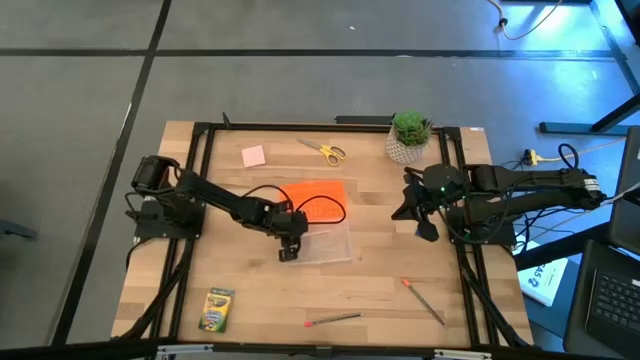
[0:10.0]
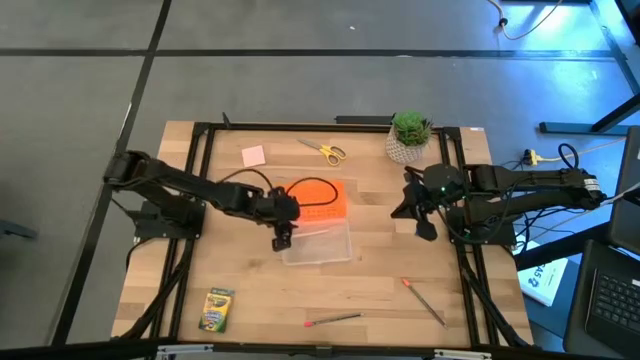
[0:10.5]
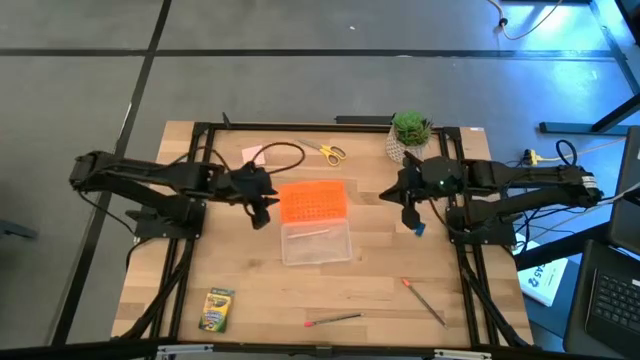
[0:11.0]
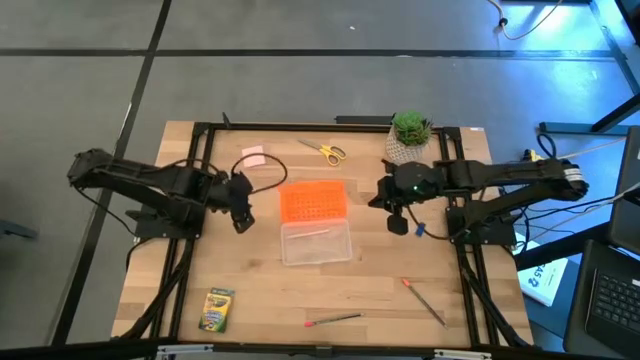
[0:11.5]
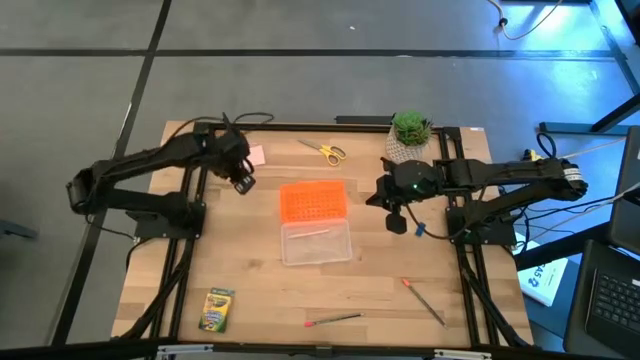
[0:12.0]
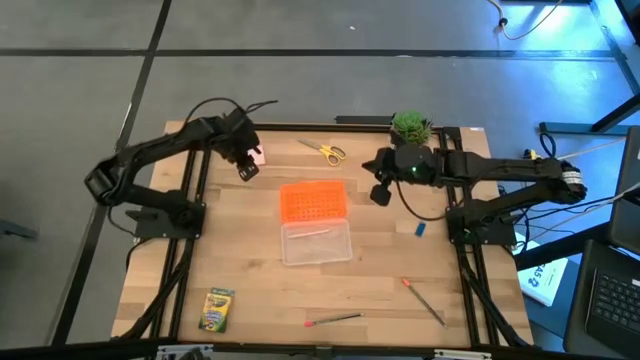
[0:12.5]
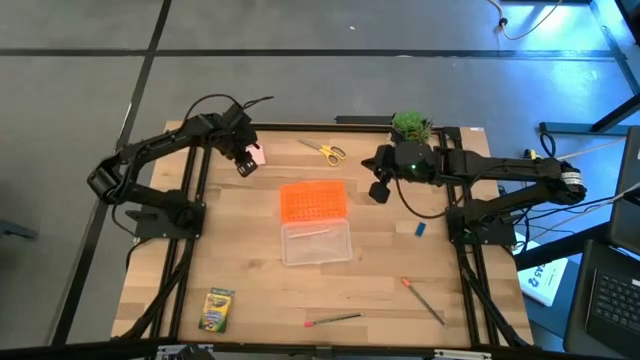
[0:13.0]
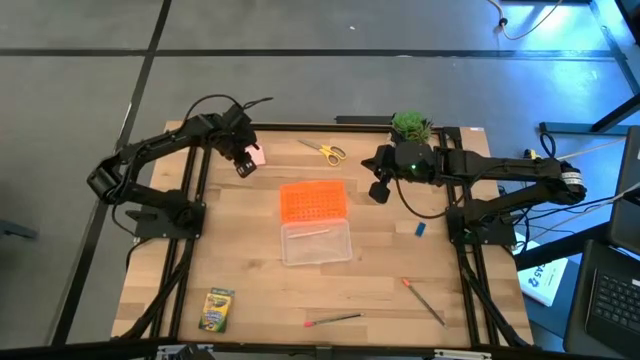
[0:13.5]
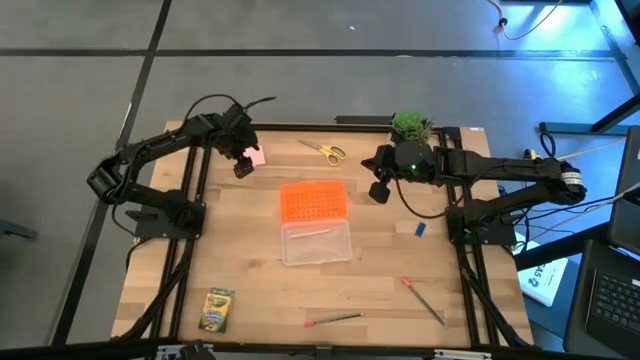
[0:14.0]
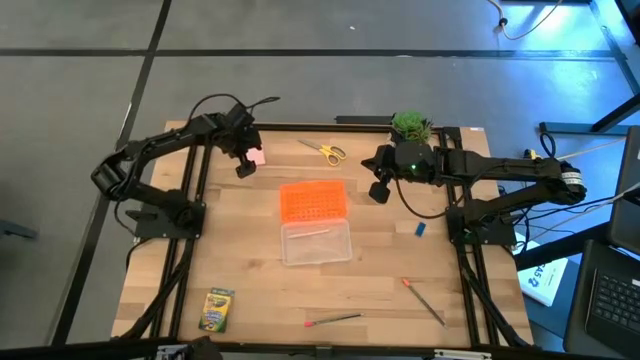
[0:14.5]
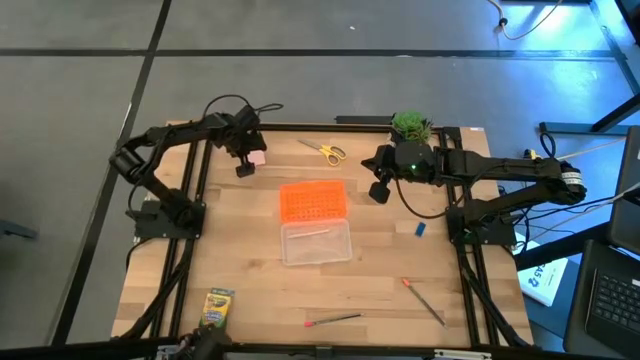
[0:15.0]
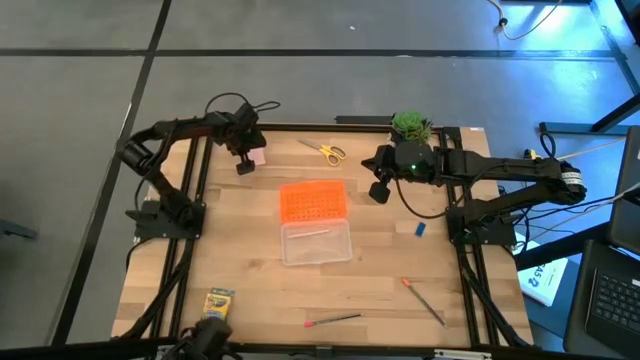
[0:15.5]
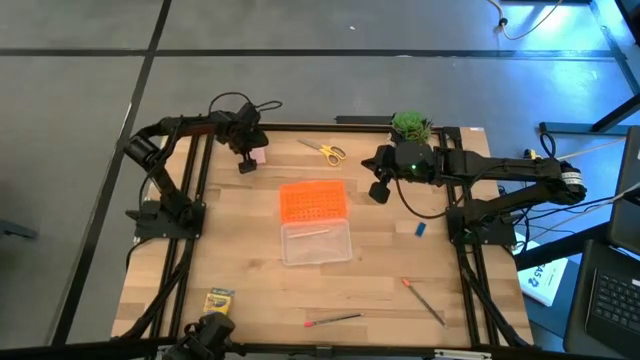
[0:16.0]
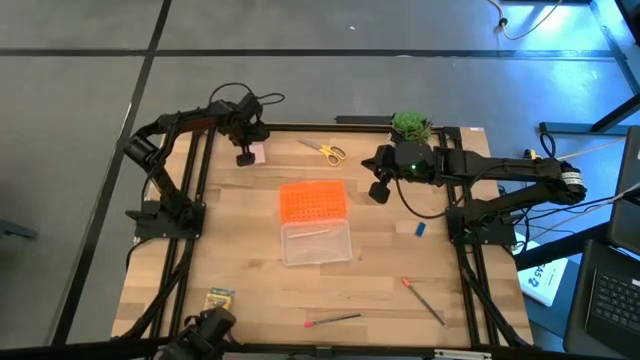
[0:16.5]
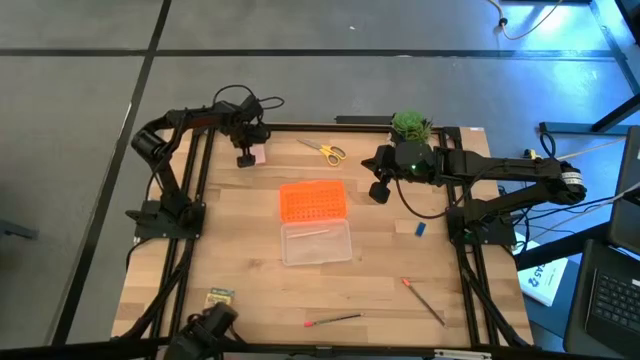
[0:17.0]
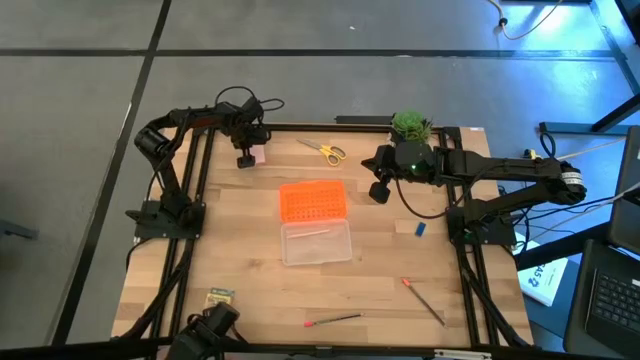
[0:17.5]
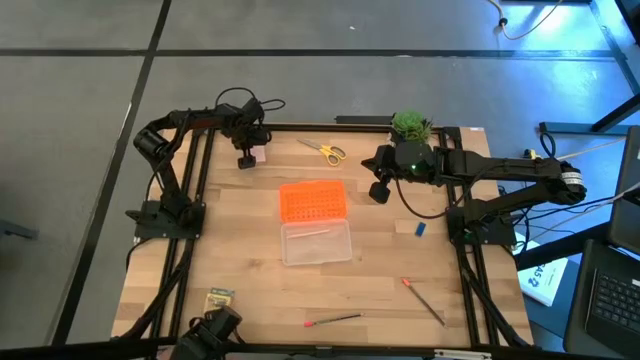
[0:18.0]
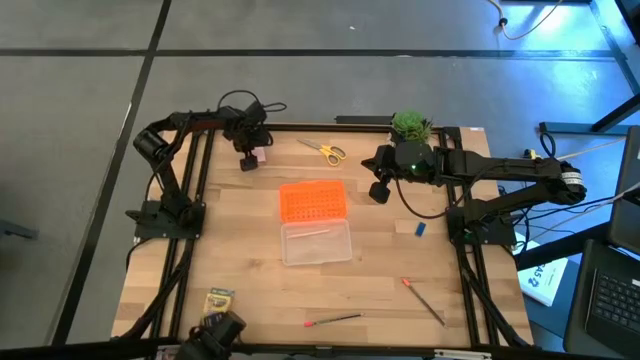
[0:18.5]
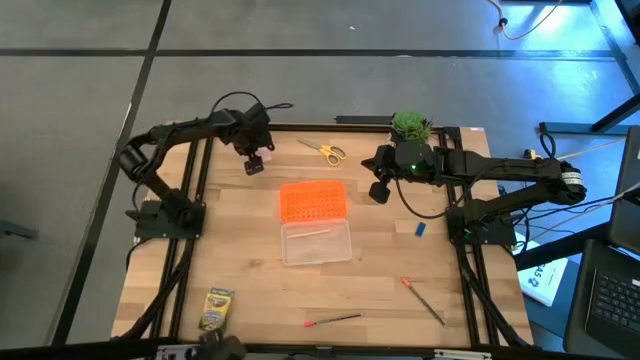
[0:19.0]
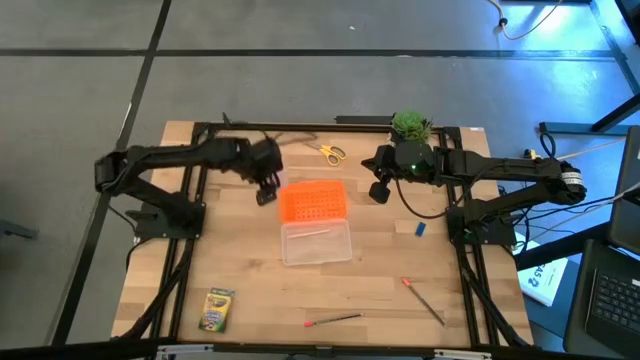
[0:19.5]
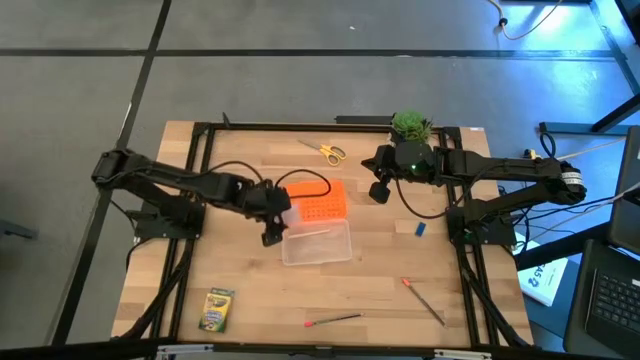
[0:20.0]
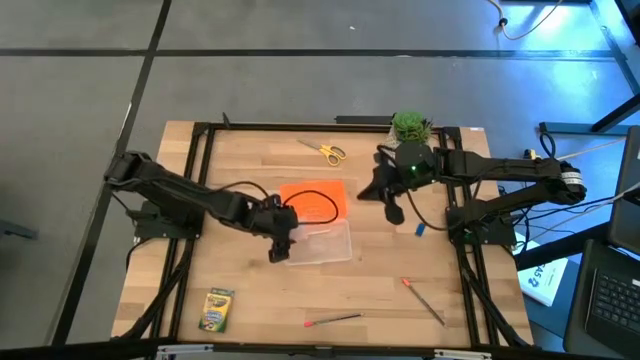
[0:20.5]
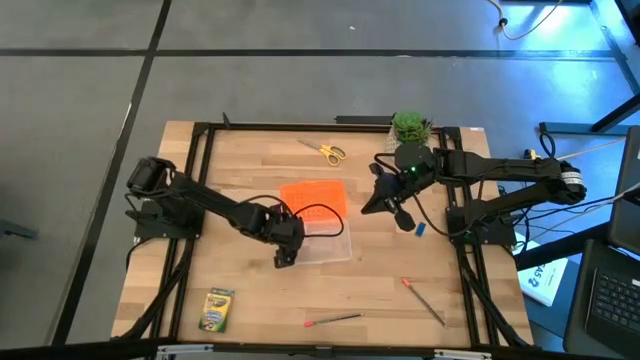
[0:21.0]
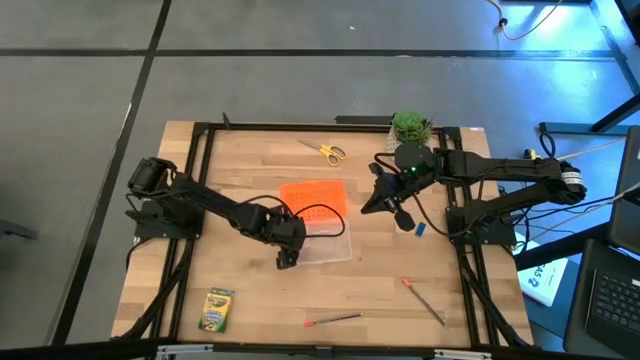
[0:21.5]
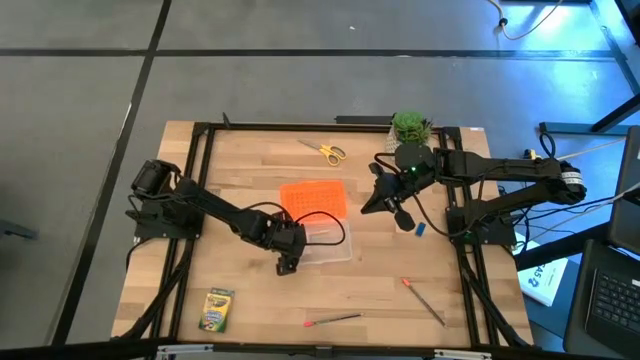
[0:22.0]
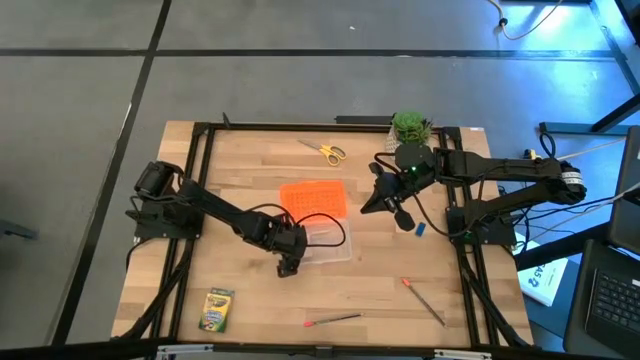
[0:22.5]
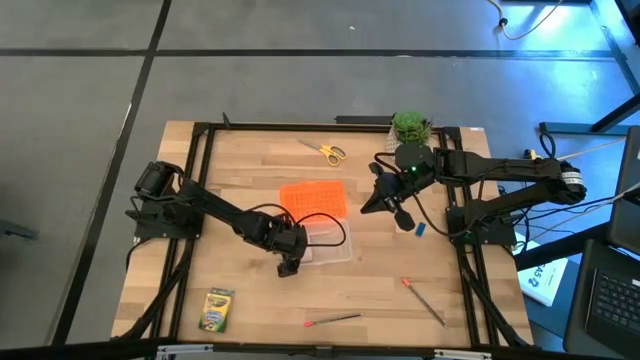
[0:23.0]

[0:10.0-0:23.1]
Task: Pack school essentials
Put the pink sticky notes into the supply box

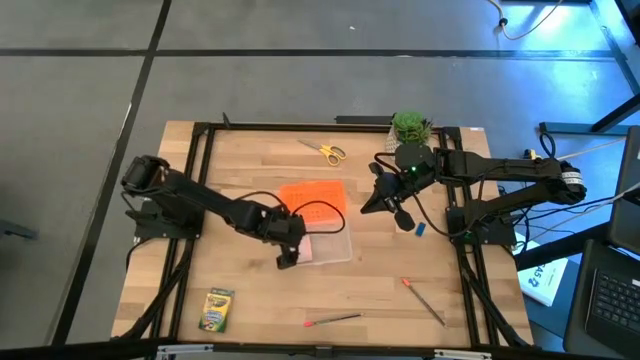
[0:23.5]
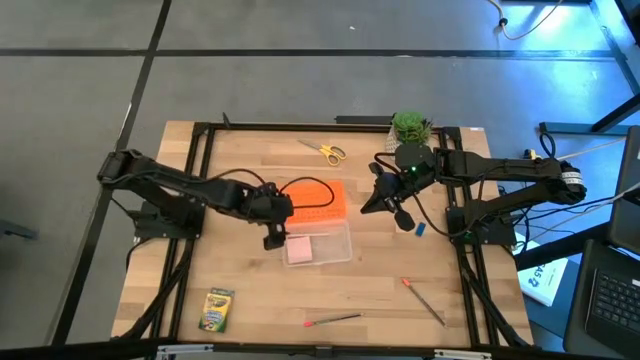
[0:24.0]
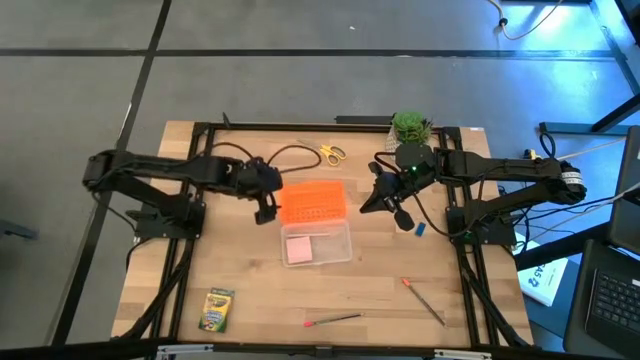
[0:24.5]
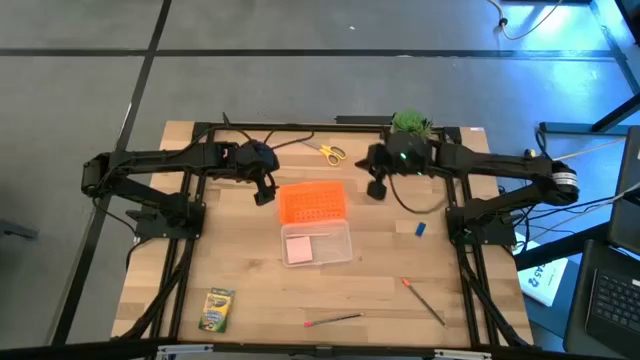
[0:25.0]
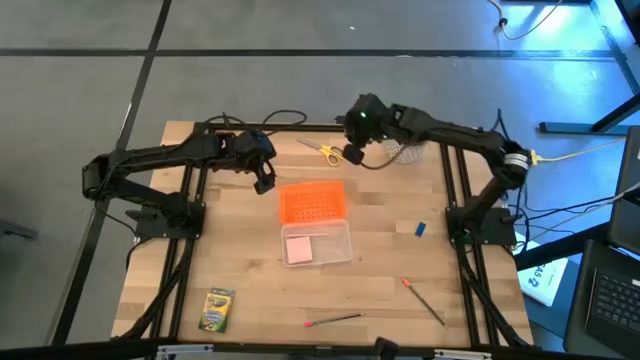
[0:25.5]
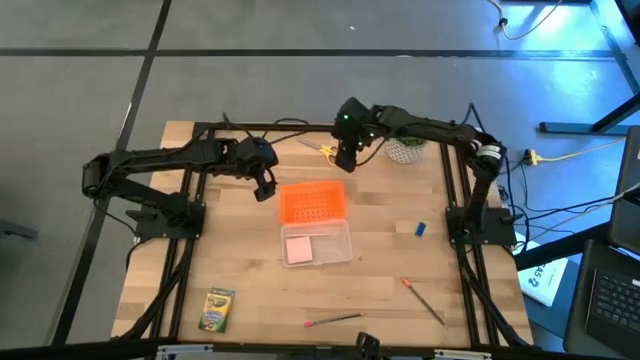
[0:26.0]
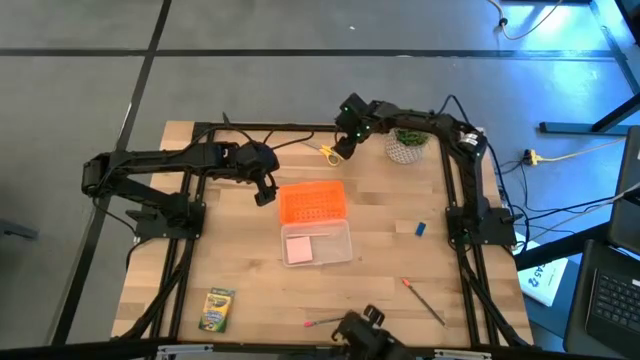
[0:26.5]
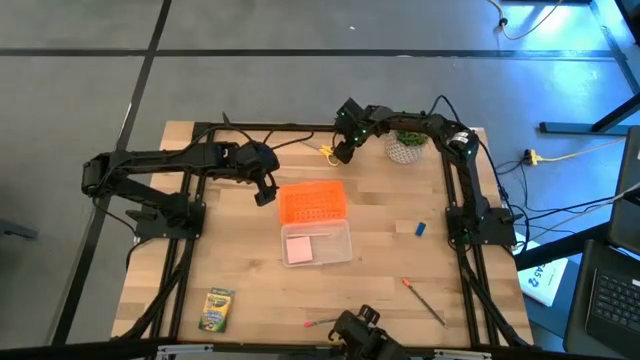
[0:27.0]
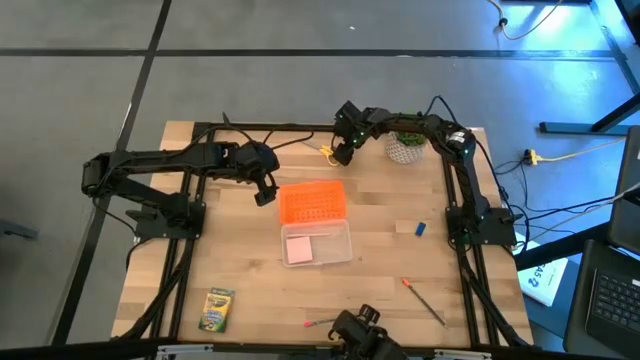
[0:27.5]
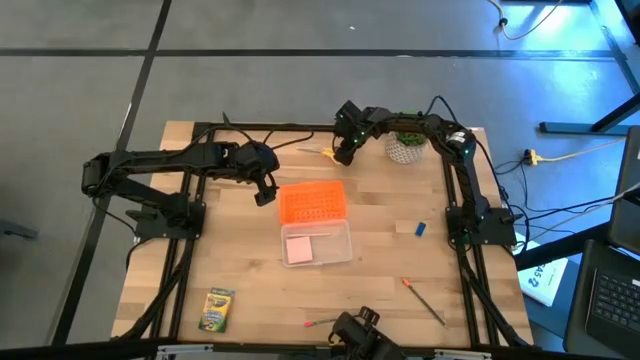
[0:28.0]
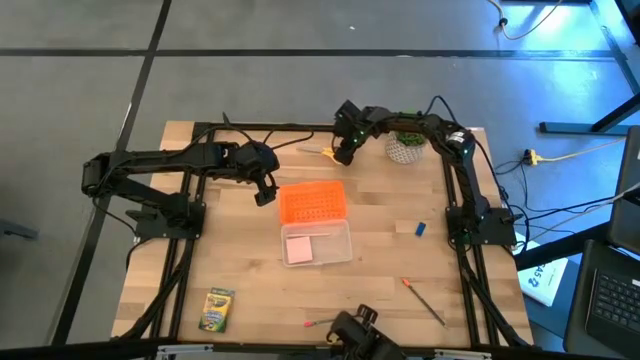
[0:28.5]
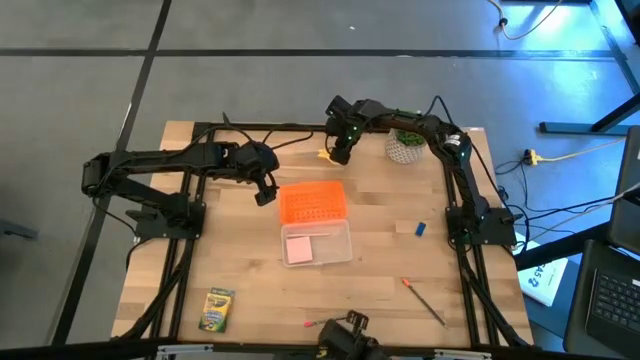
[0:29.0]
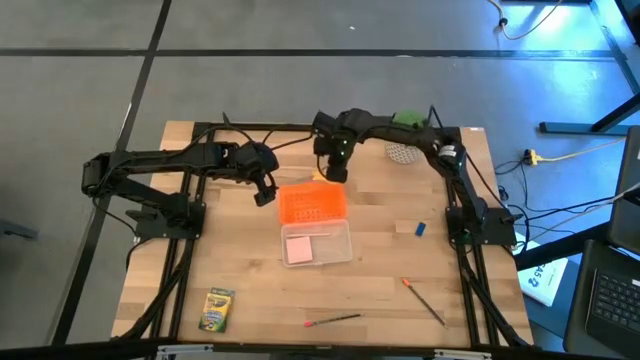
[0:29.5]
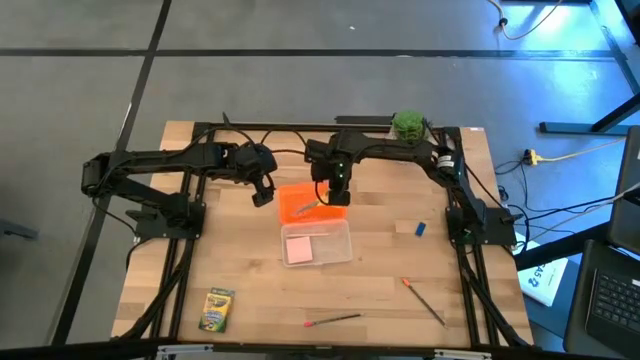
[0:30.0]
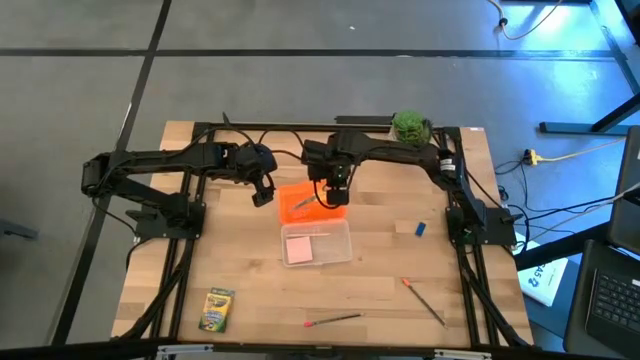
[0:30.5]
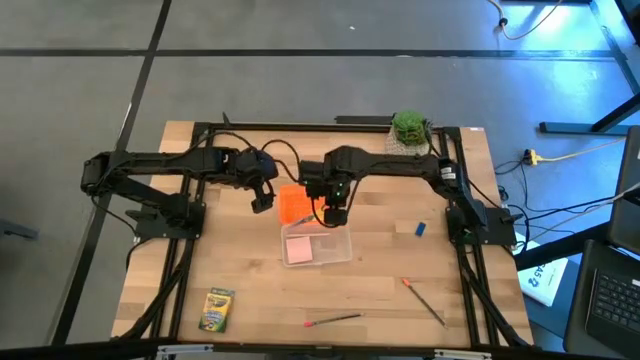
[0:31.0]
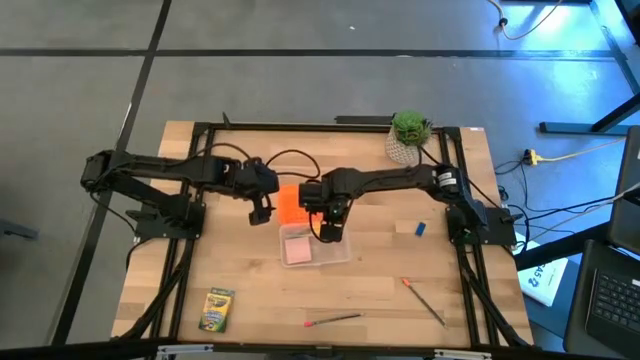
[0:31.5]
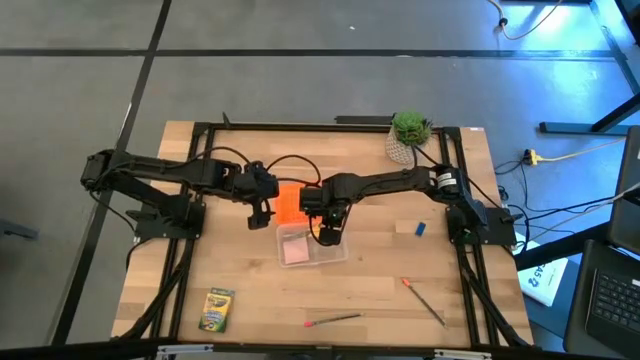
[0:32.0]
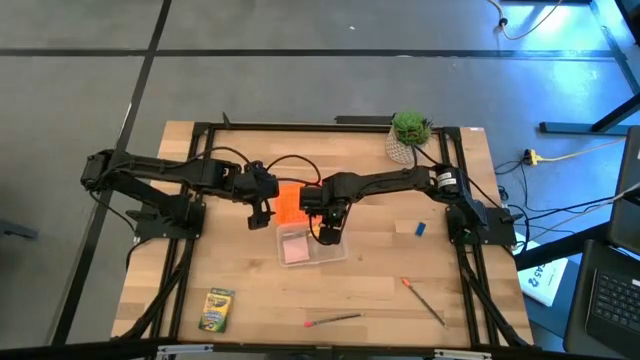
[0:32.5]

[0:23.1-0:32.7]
Put the yellow scissors into the supply box
